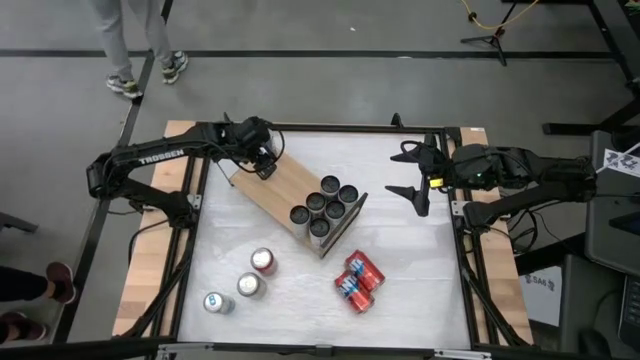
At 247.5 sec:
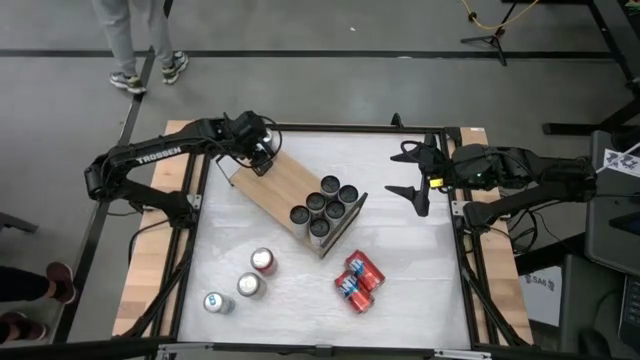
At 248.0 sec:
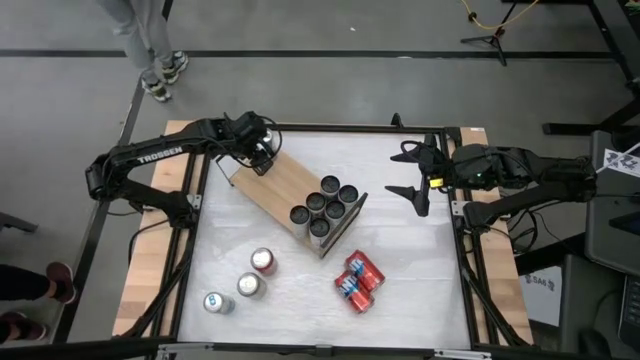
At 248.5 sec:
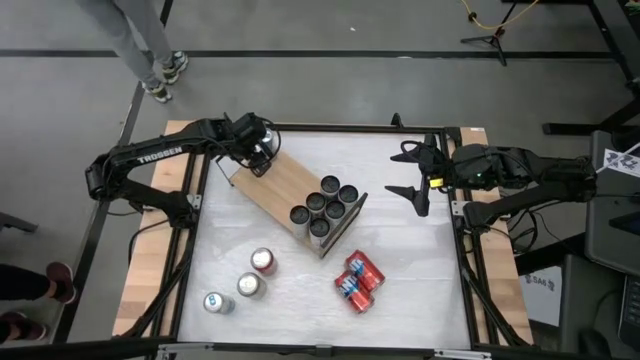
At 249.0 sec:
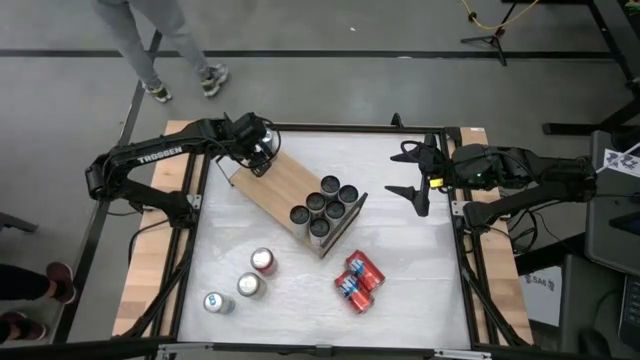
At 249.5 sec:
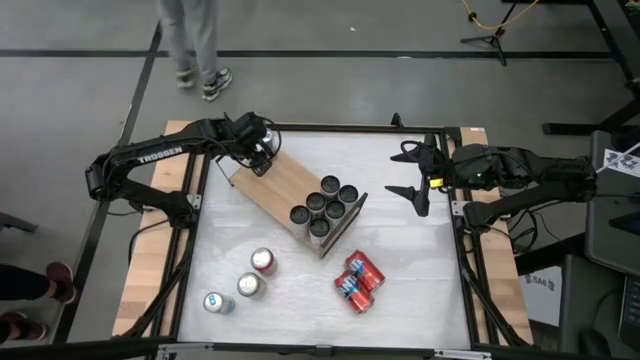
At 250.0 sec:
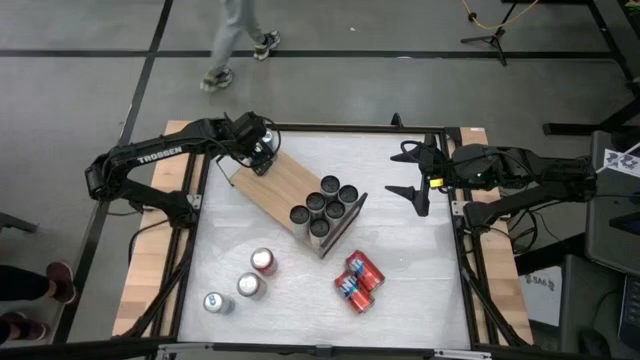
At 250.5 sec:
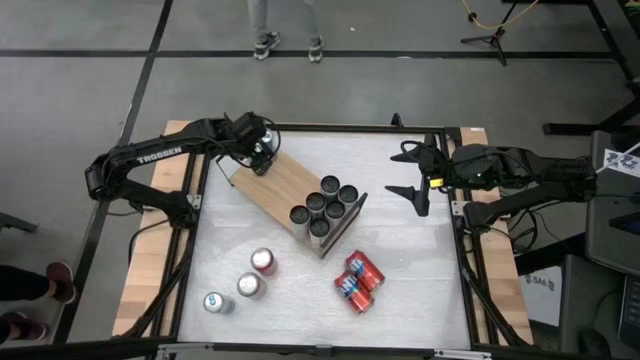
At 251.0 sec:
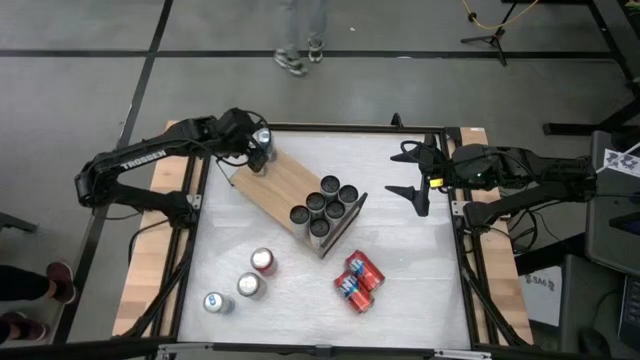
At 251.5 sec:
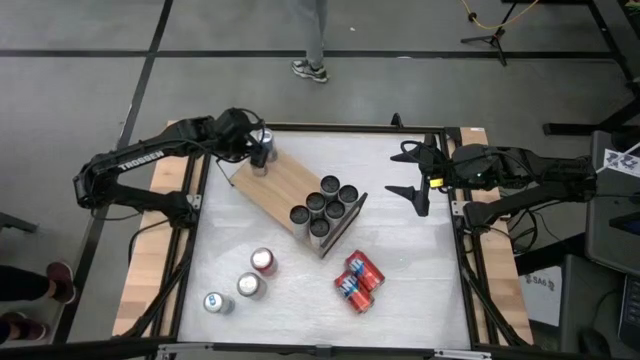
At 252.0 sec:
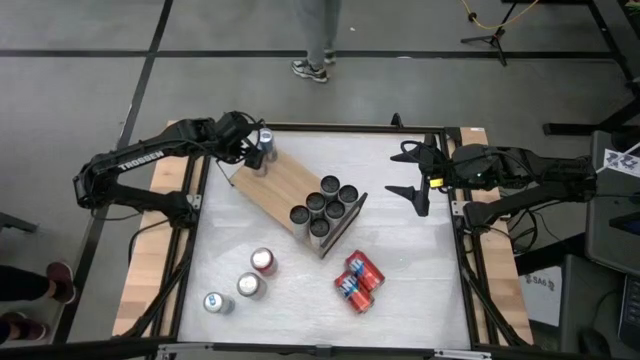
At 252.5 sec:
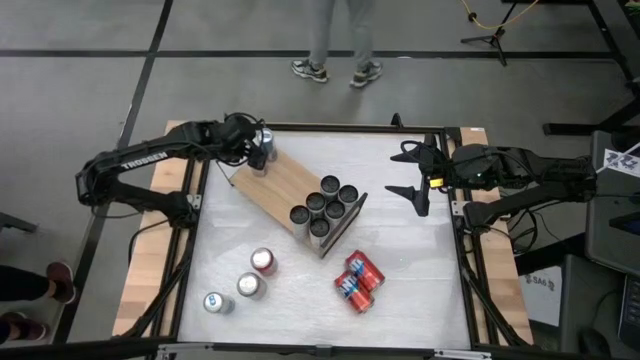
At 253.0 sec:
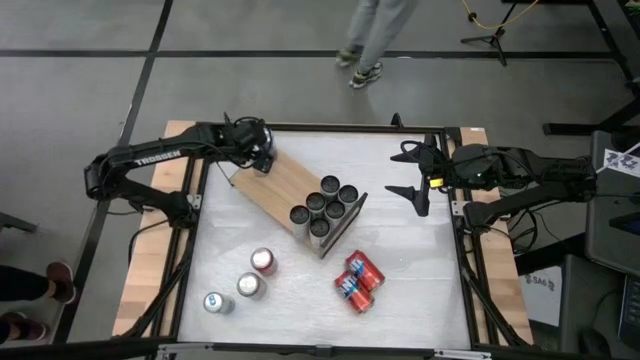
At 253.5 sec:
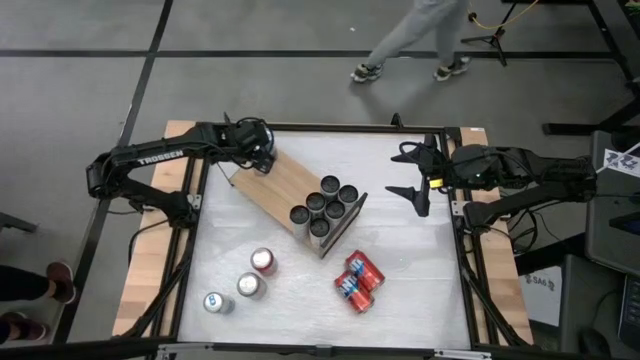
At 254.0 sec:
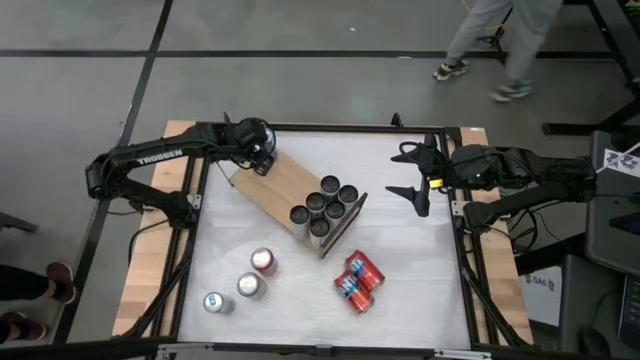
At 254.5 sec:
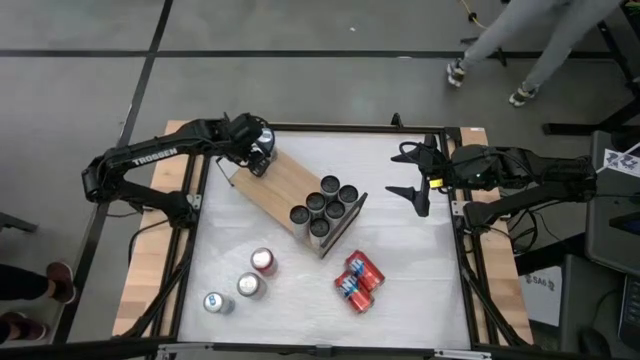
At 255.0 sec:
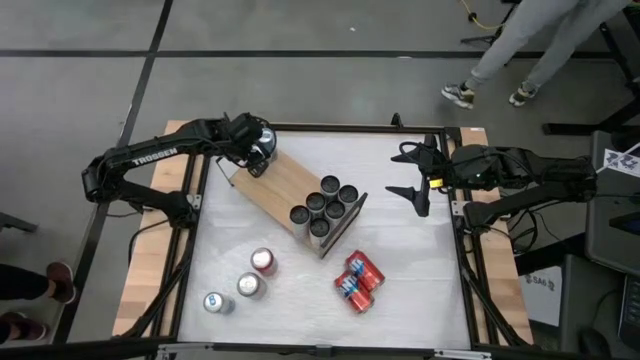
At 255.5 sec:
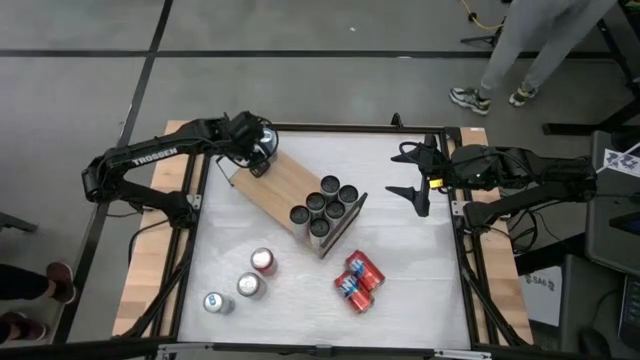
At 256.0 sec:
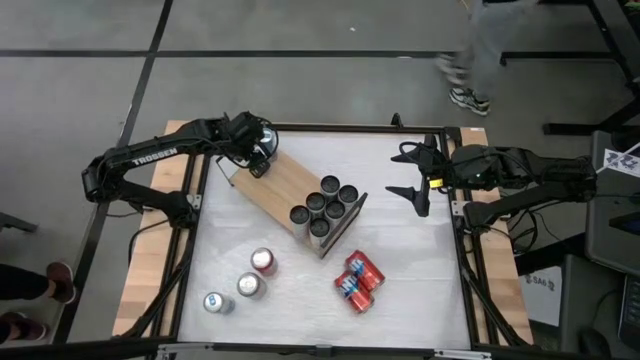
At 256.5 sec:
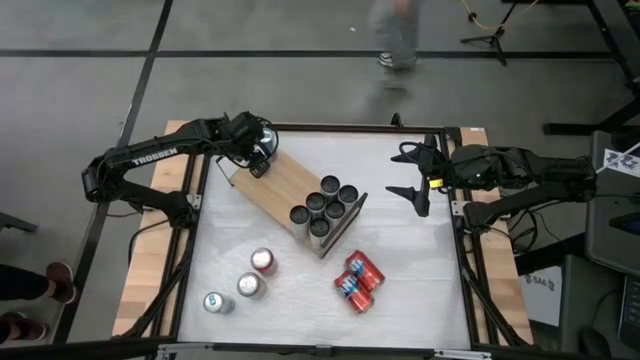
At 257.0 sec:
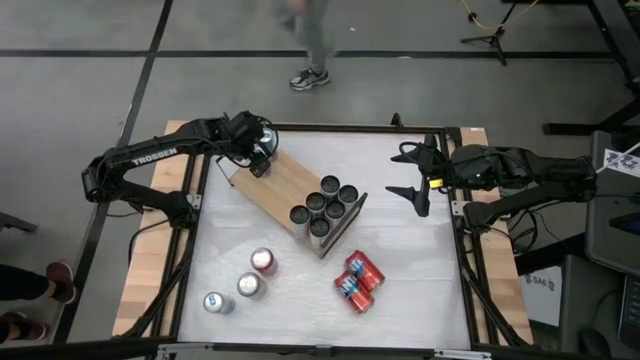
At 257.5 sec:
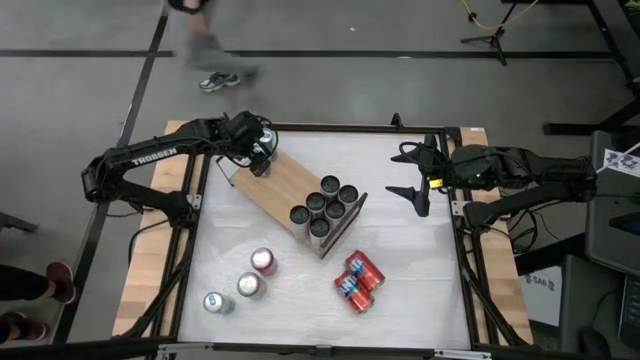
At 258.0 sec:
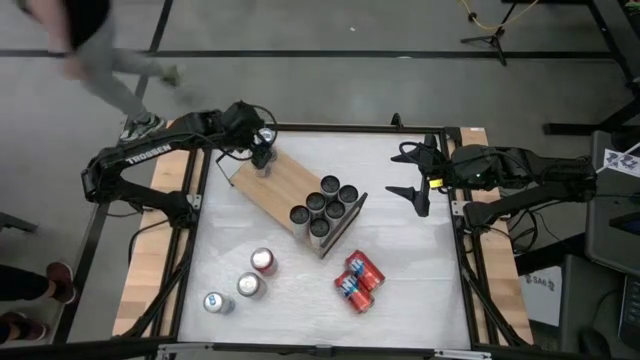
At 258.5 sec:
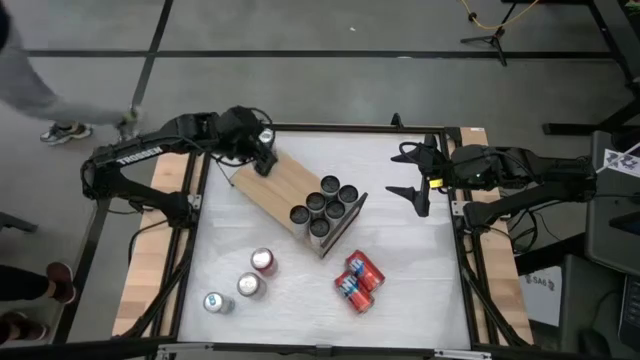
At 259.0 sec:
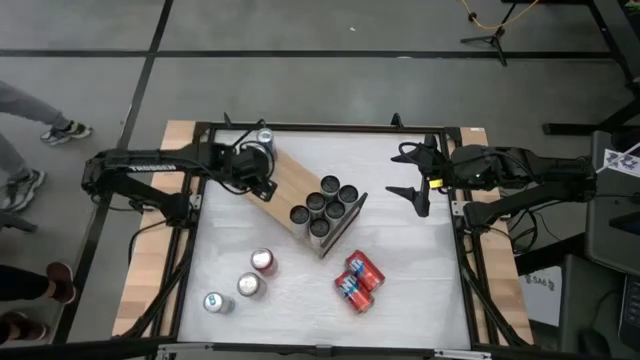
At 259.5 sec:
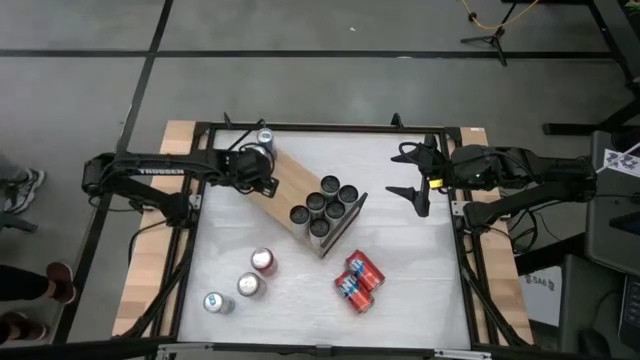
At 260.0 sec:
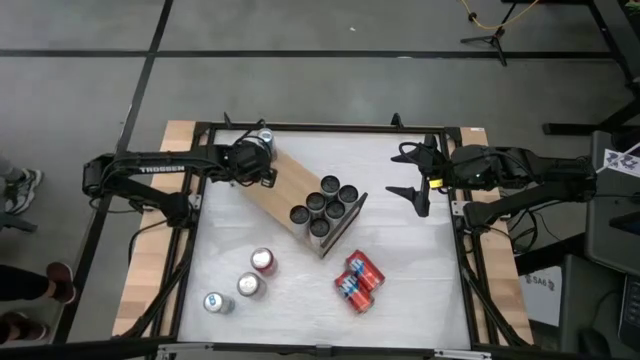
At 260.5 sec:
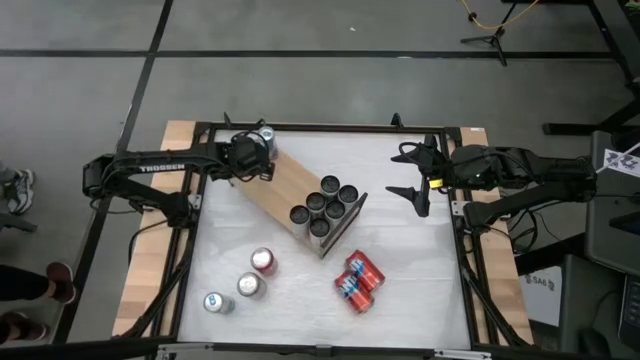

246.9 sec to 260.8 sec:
Task: Place canned beverage on shelf
Put the right blue soda can on the shelf aligned with the other blue soda can
